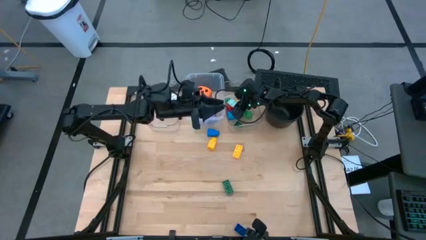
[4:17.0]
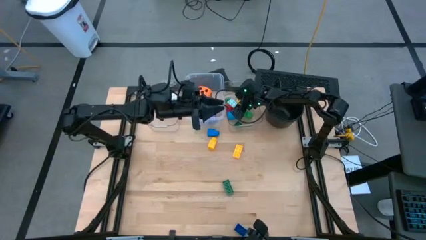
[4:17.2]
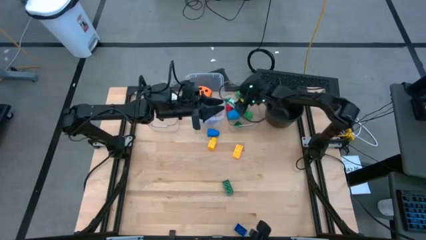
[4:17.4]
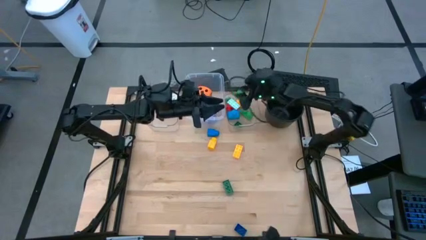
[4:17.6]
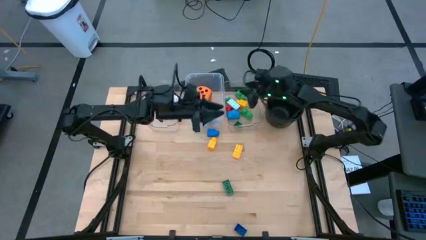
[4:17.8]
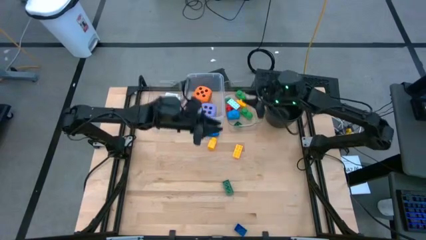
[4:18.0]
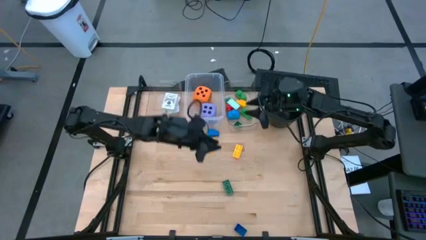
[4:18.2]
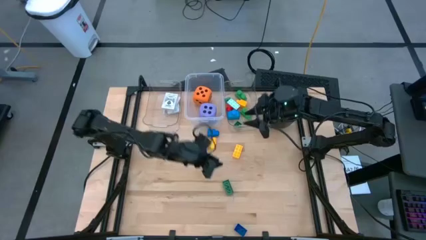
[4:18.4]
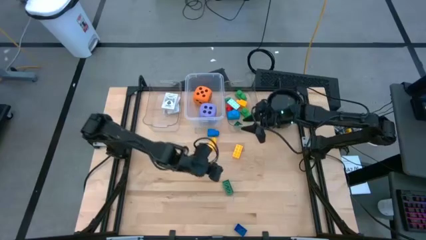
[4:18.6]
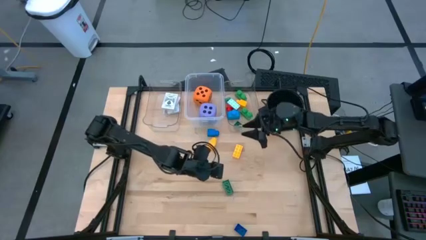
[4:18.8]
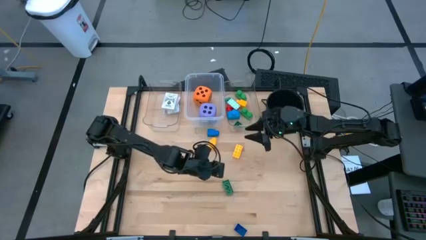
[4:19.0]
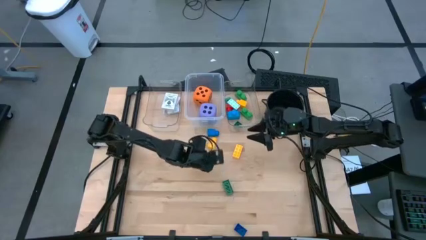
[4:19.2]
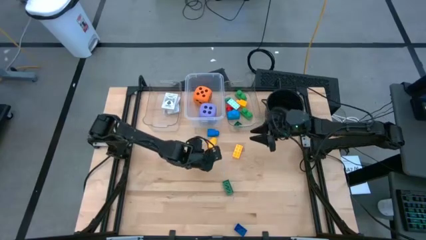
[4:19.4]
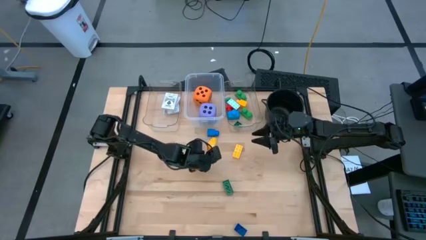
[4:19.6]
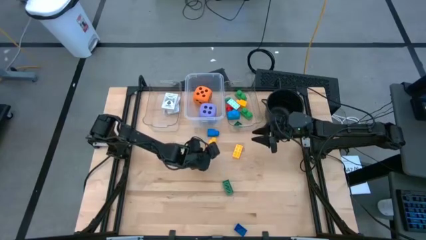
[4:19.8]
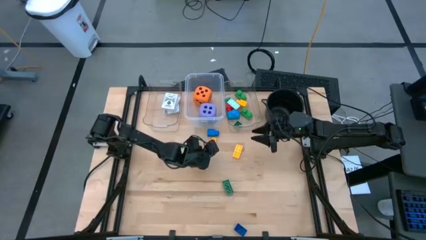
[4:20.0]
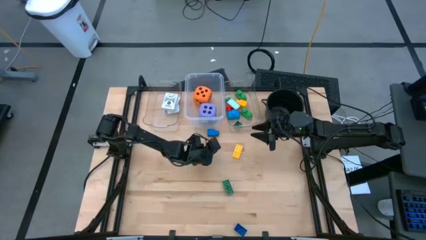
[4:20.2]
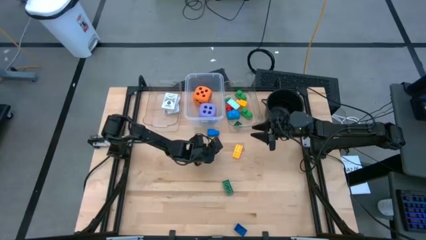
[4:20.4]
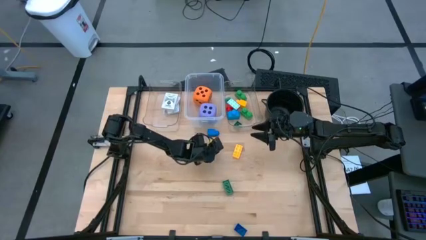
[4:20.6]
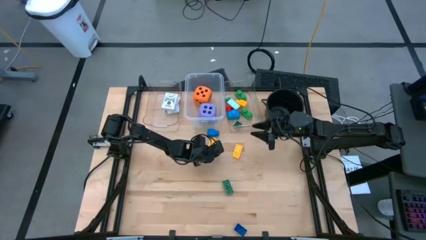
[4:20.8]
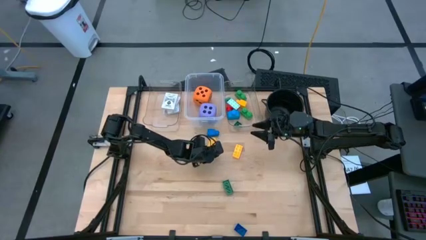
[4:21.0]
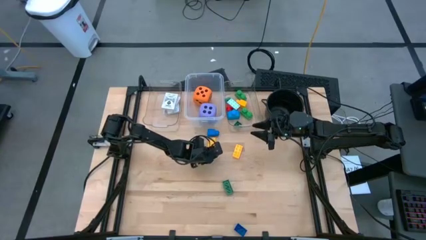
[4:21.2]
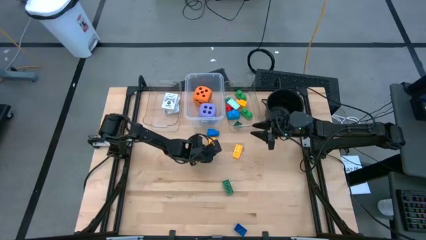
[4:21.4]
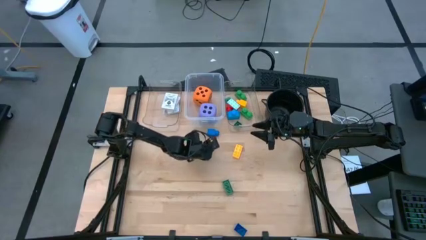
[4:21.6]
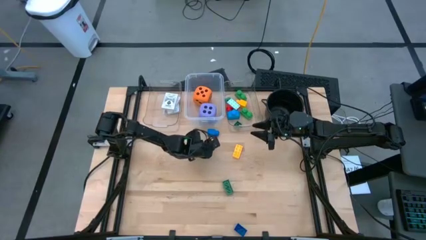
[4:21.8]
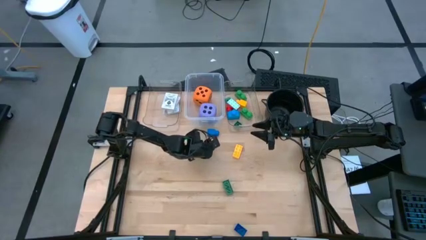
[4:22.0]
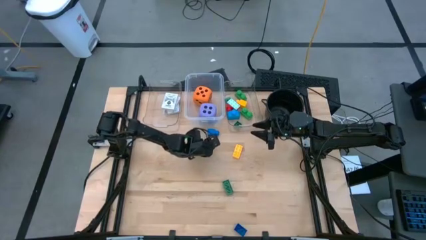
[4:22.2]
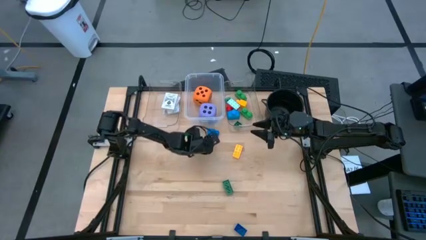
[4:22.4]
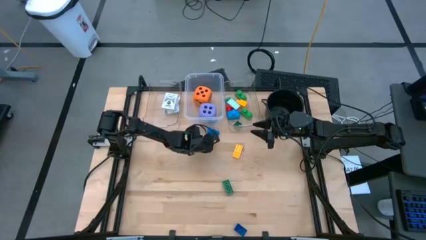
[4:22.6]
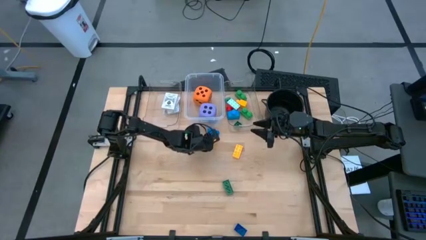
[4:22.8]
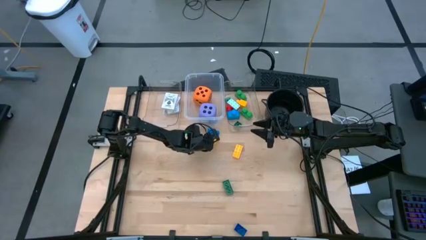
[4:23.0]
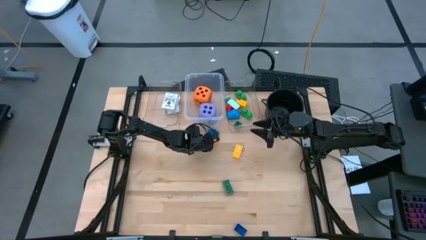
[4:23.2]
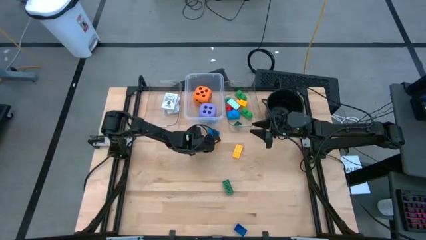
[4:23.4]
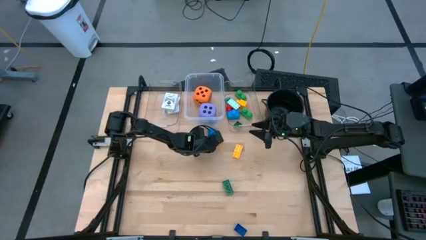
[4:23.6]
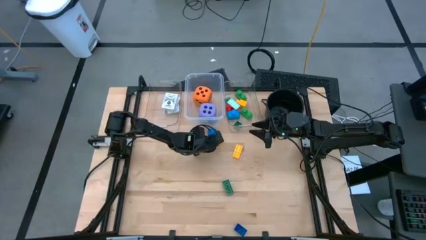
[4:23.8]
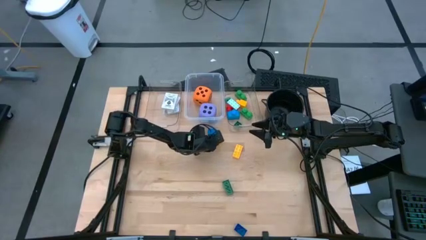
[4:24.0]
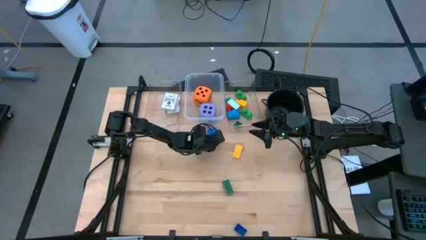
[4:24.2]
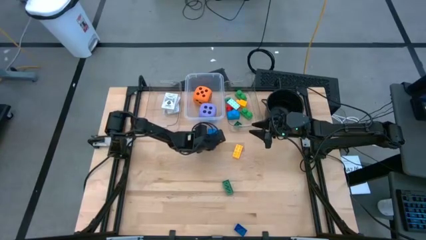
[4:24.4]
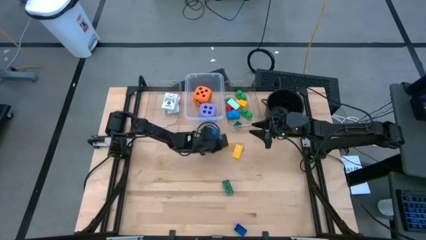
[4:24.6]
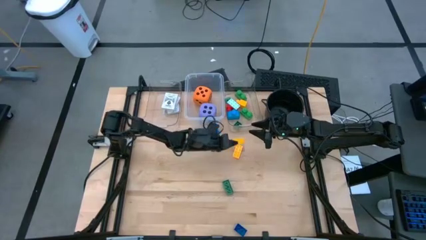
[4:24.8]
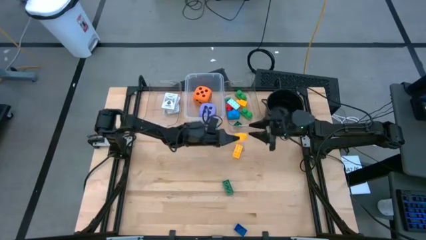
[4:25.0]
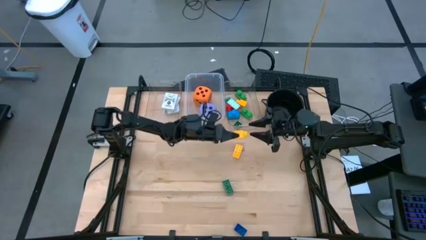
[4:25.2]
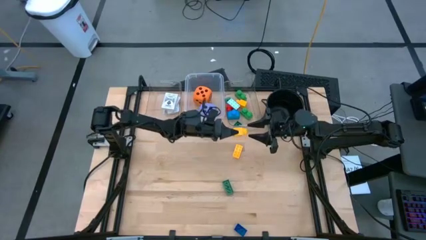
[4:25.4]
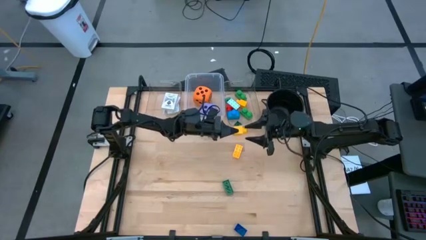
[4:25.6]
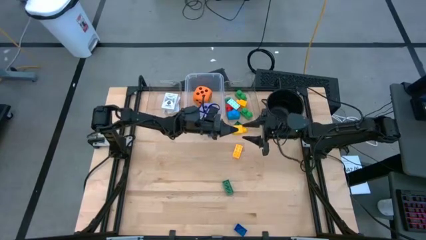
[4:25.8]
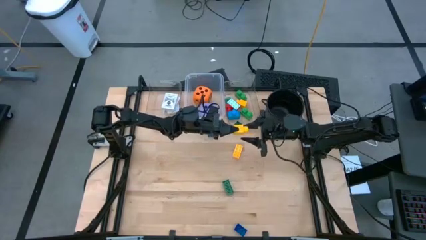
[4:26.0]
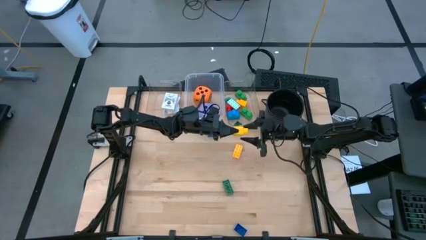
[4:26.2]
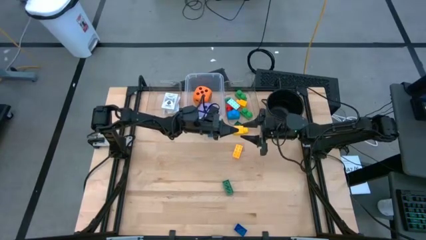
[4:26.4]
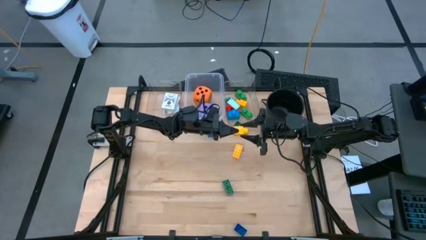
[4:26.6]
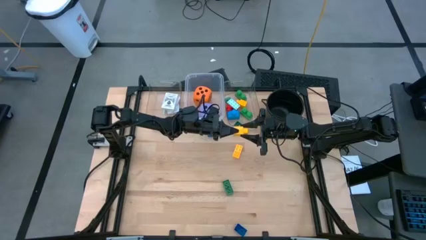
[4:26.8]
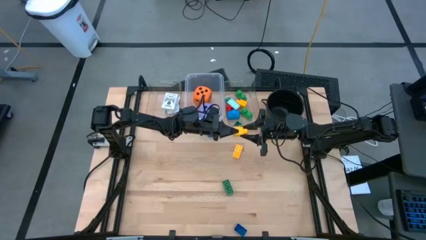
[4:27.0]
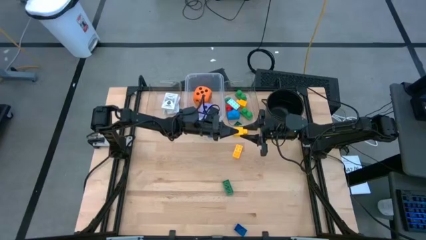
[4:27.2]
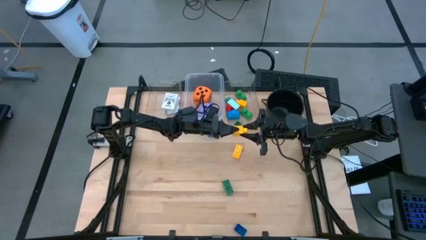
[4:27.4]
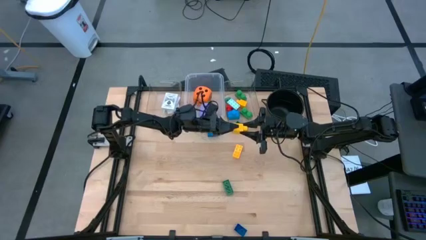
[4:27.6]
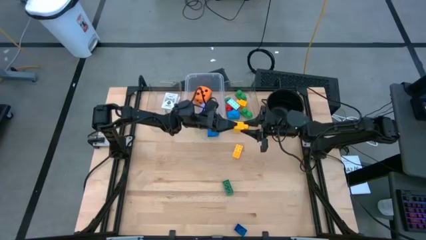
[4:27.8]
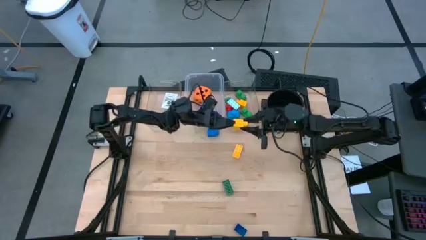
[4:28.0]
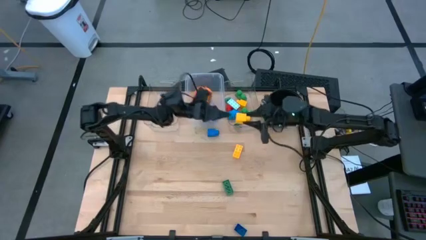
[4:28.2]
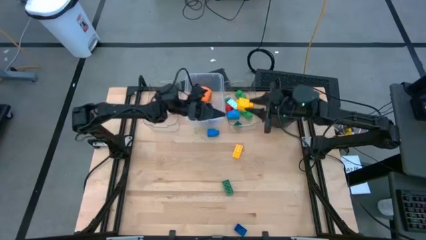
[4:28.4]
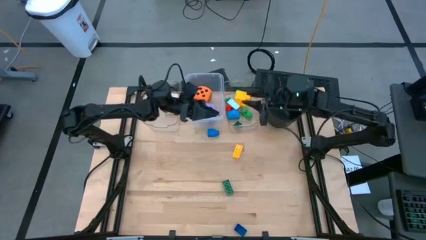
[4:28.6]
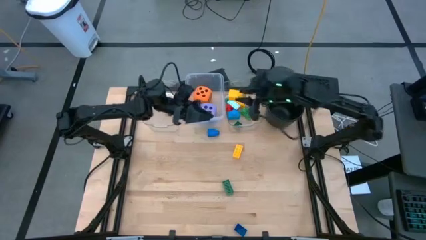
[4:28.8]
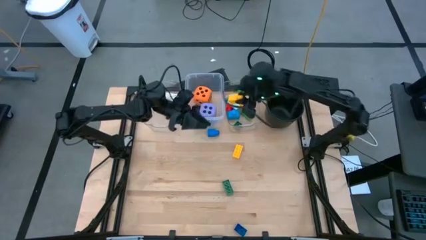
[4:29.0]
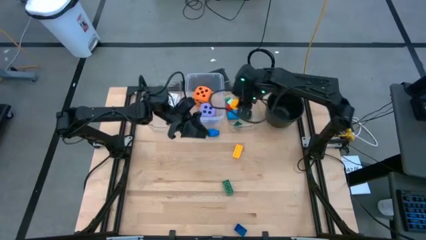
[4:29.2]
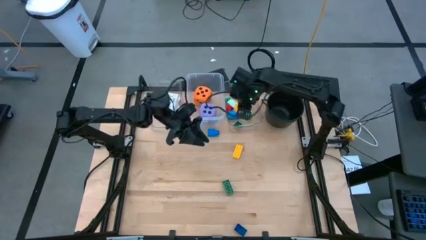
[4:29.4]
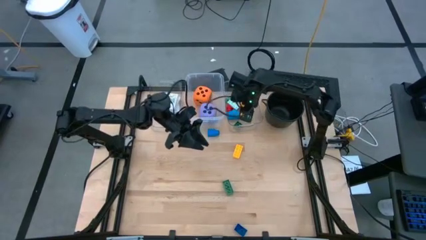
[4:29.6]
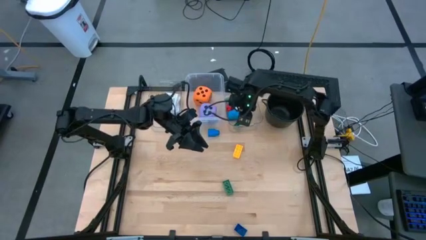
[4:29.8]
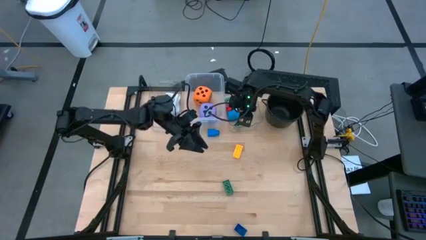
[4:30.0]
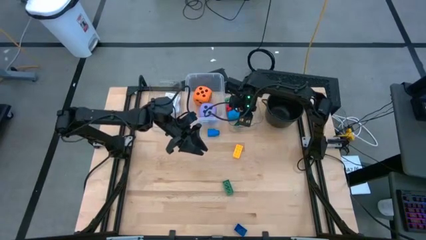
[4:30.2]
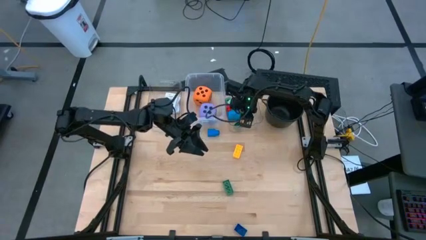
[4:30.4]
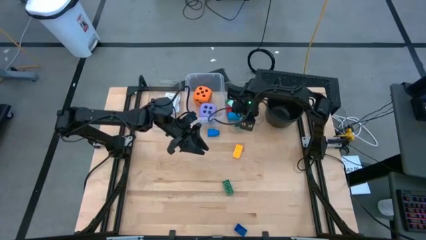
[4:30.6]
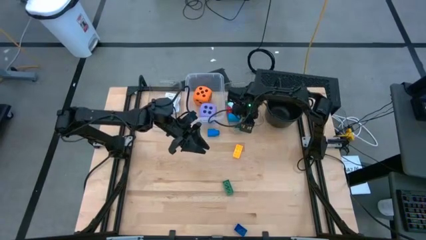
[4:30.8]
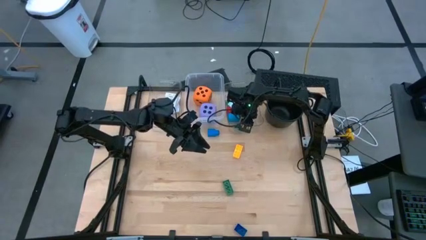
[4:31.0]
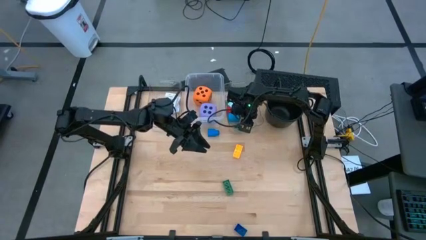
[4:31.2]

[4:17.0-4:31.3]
Task: Pick & Place Toys
Put the left yellow game piece into the right transparent bin
